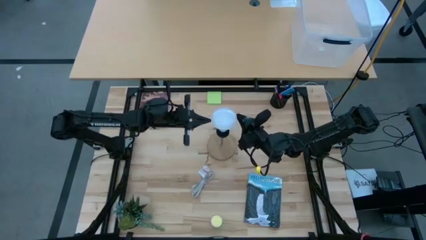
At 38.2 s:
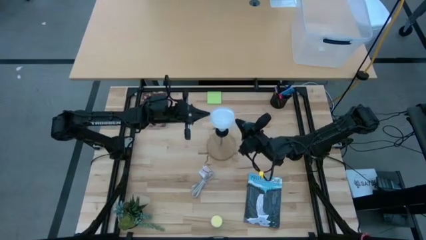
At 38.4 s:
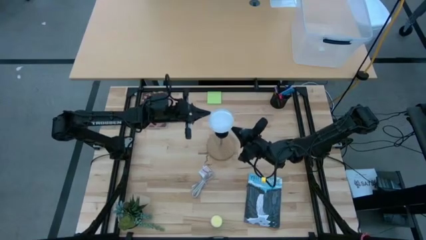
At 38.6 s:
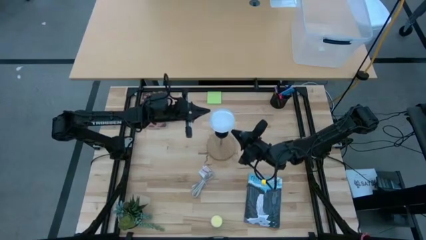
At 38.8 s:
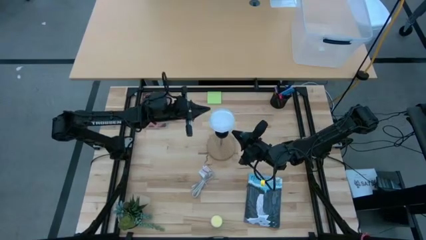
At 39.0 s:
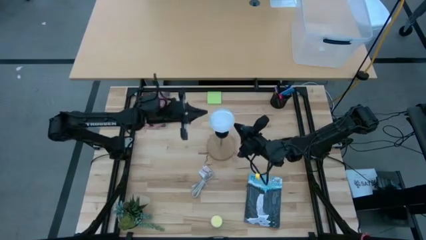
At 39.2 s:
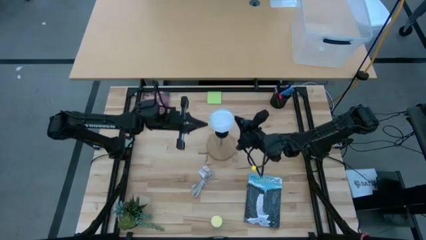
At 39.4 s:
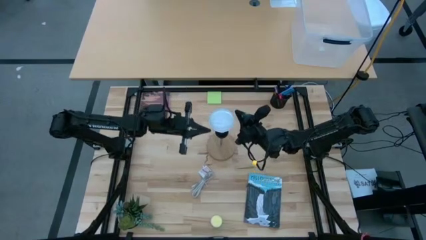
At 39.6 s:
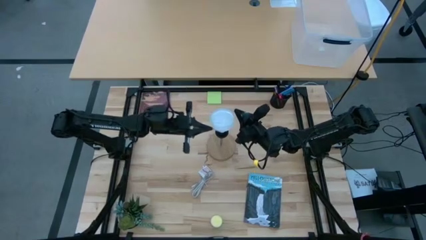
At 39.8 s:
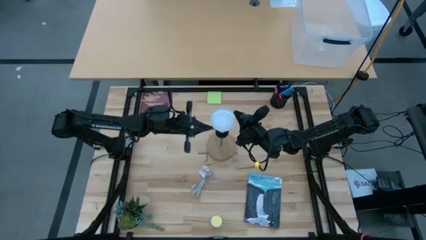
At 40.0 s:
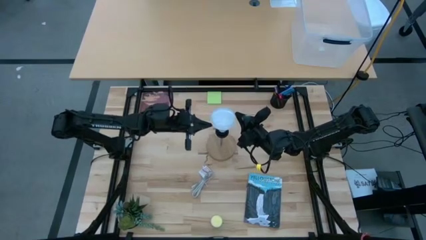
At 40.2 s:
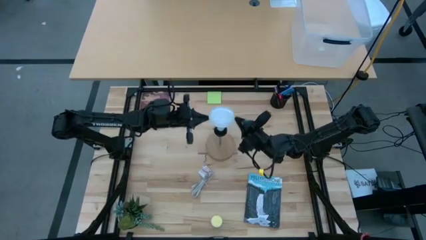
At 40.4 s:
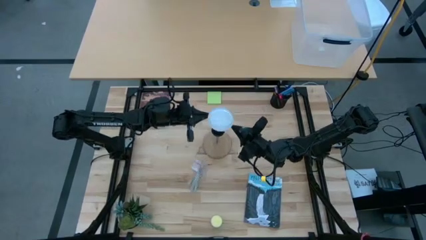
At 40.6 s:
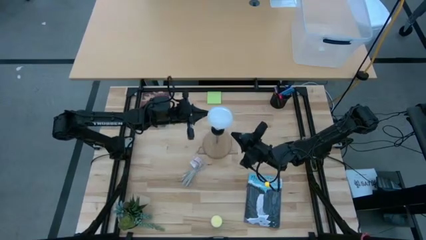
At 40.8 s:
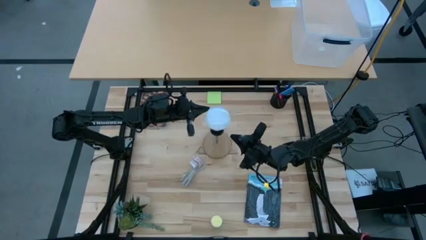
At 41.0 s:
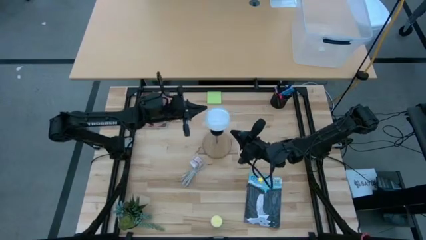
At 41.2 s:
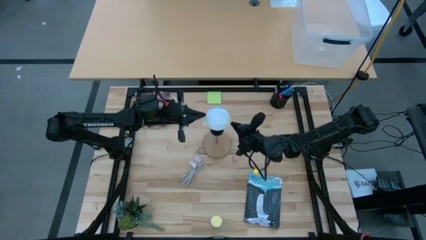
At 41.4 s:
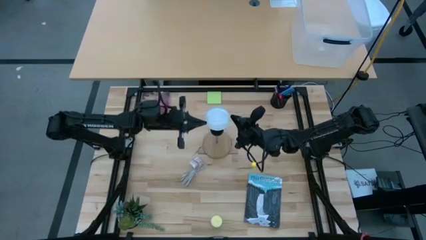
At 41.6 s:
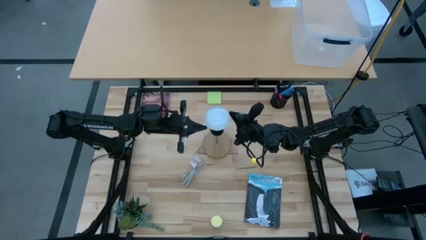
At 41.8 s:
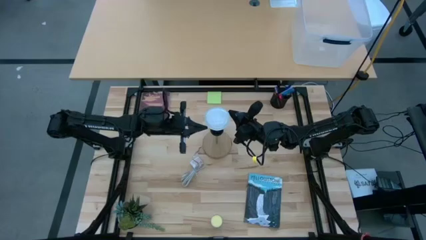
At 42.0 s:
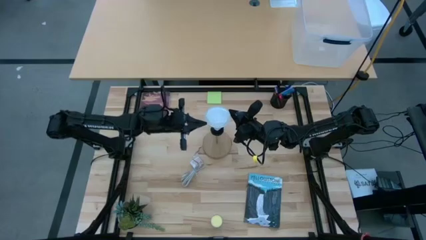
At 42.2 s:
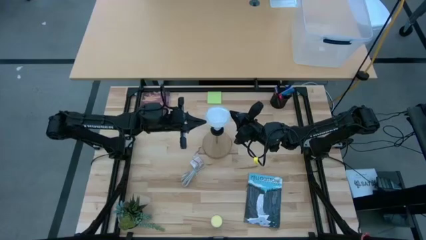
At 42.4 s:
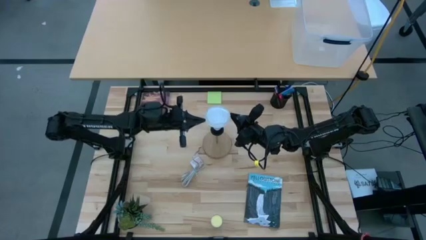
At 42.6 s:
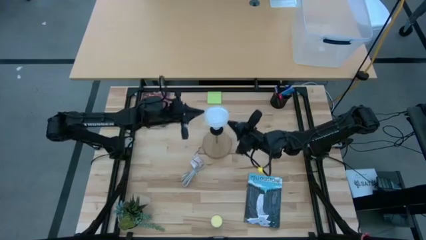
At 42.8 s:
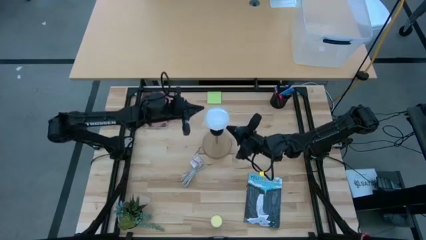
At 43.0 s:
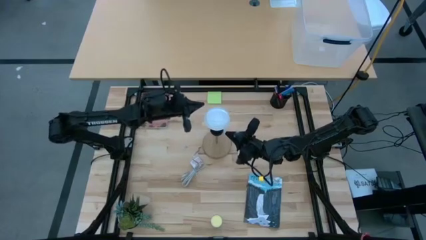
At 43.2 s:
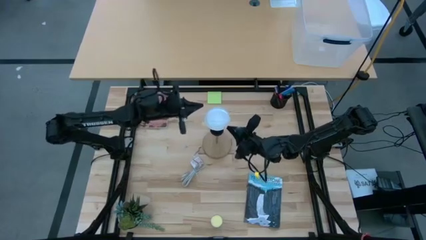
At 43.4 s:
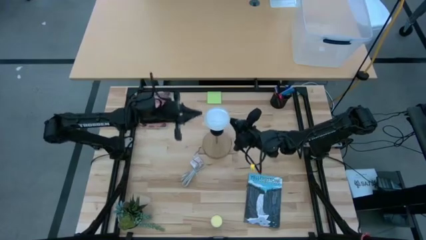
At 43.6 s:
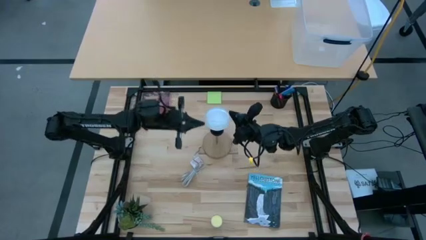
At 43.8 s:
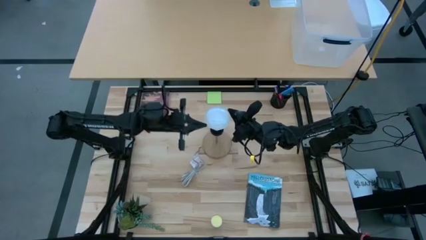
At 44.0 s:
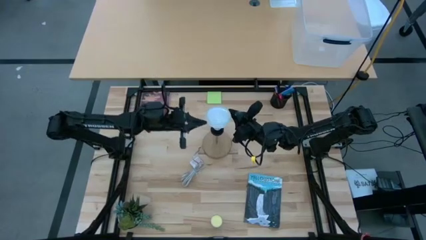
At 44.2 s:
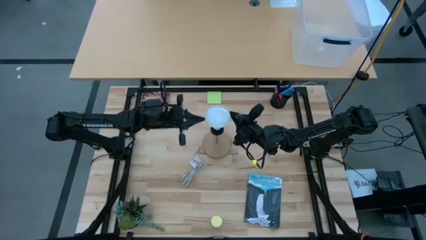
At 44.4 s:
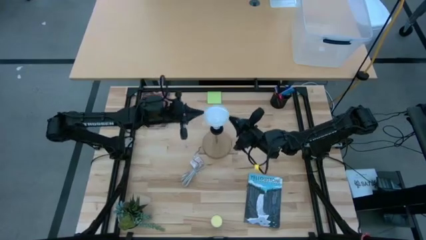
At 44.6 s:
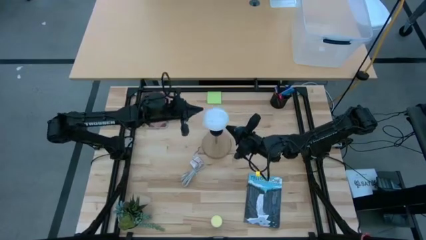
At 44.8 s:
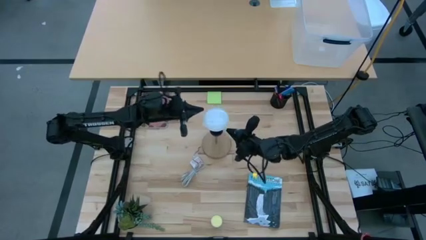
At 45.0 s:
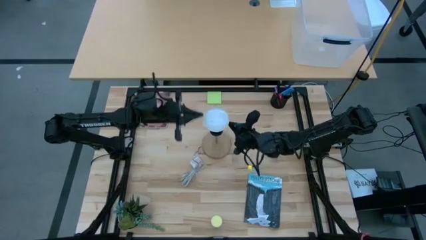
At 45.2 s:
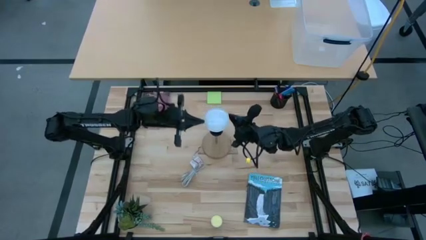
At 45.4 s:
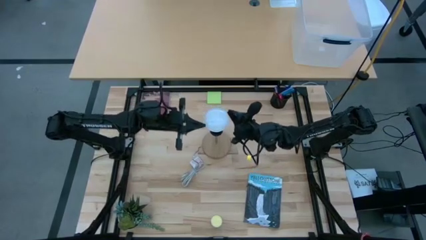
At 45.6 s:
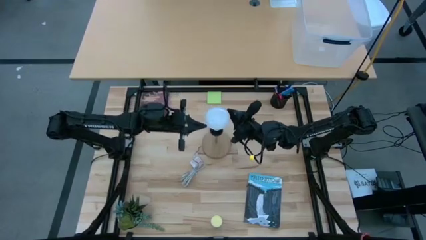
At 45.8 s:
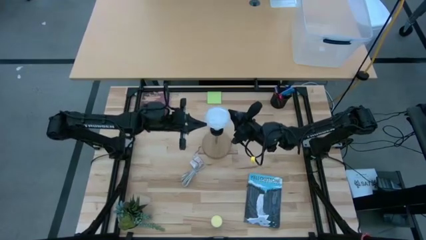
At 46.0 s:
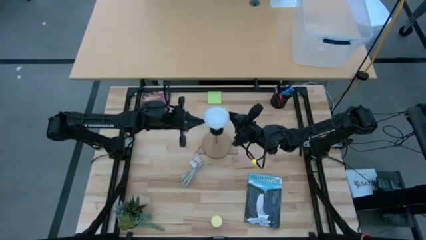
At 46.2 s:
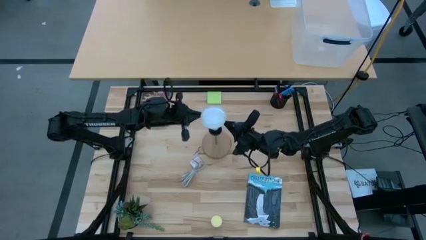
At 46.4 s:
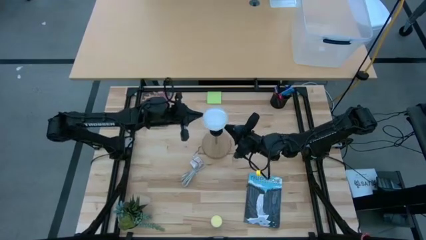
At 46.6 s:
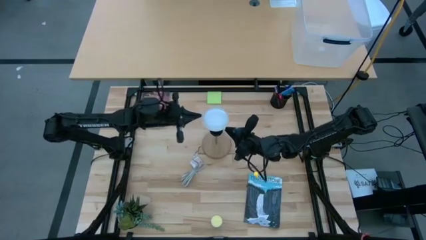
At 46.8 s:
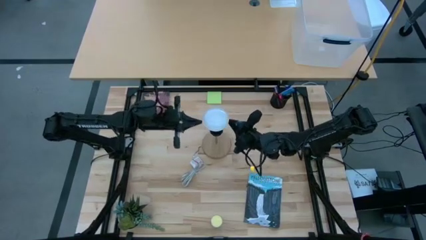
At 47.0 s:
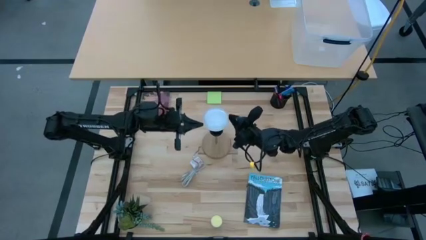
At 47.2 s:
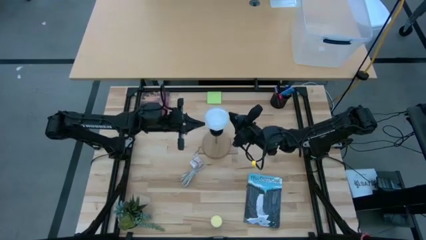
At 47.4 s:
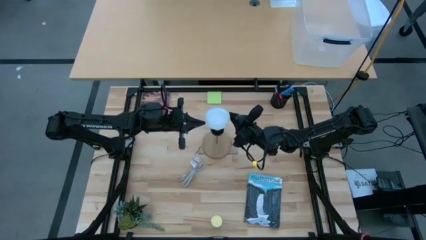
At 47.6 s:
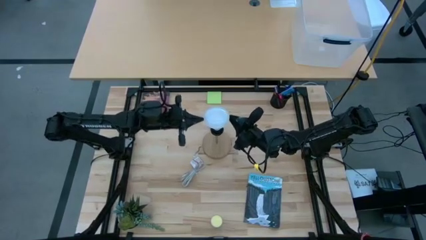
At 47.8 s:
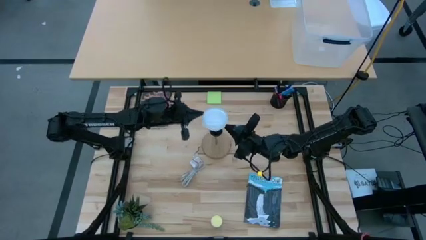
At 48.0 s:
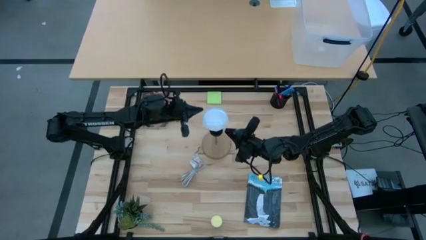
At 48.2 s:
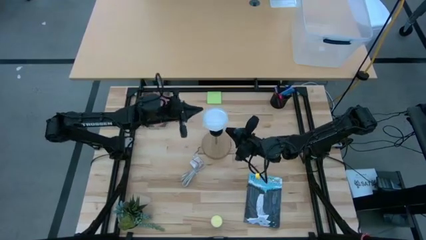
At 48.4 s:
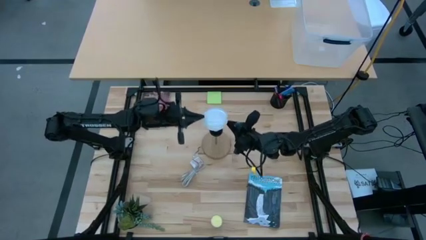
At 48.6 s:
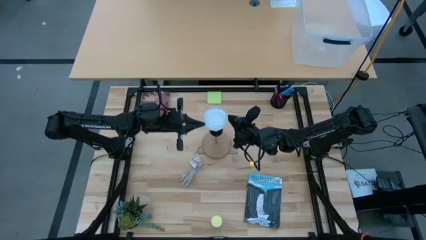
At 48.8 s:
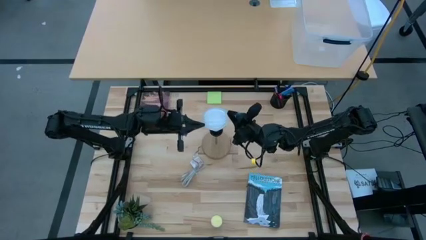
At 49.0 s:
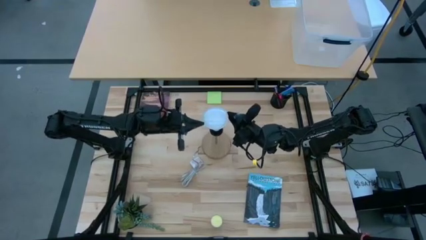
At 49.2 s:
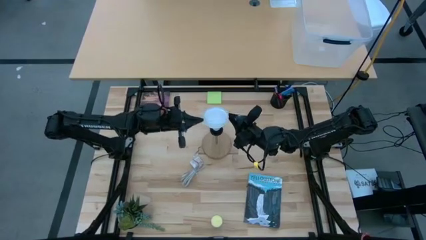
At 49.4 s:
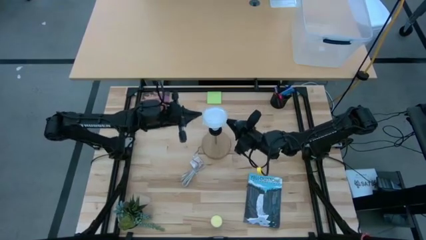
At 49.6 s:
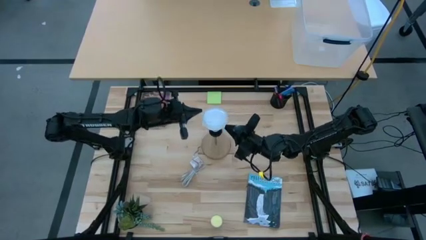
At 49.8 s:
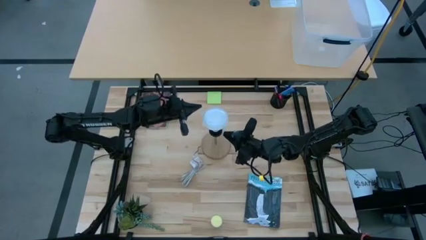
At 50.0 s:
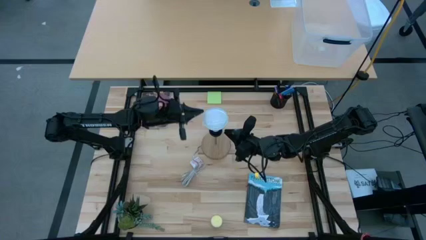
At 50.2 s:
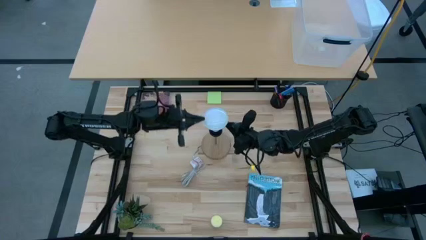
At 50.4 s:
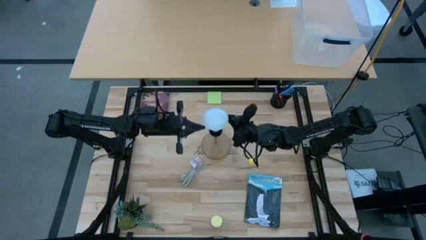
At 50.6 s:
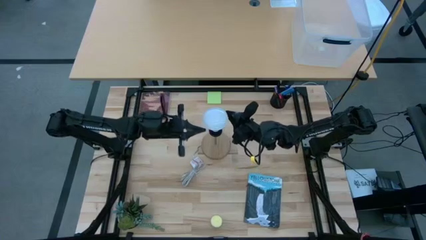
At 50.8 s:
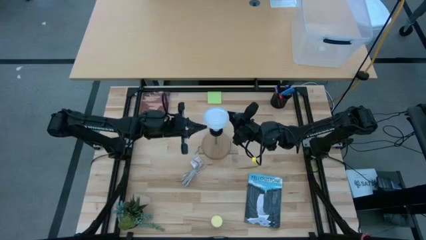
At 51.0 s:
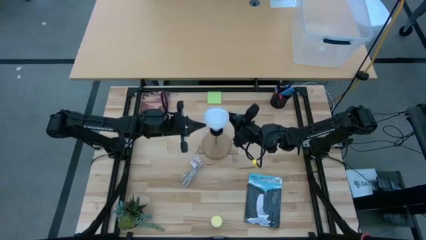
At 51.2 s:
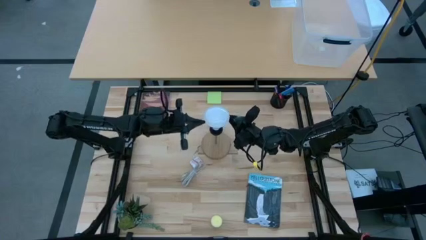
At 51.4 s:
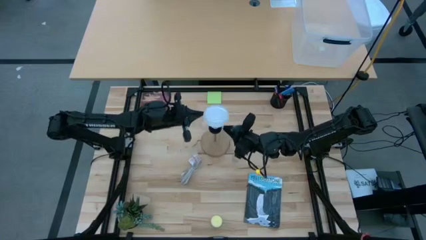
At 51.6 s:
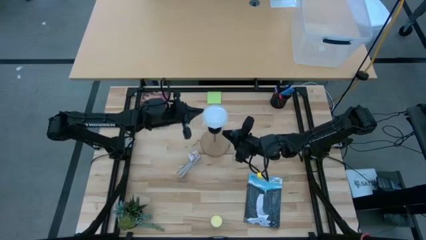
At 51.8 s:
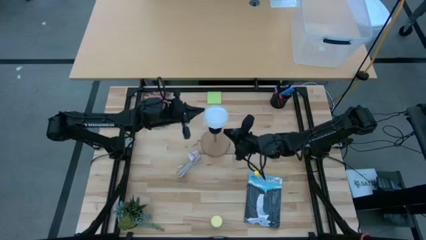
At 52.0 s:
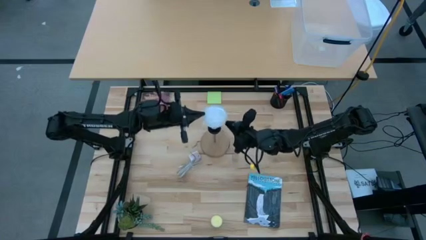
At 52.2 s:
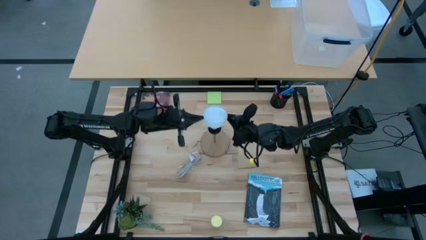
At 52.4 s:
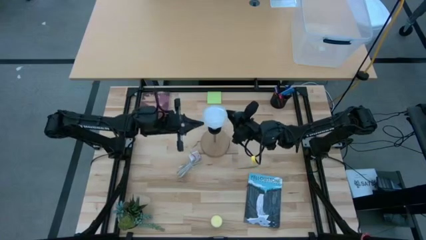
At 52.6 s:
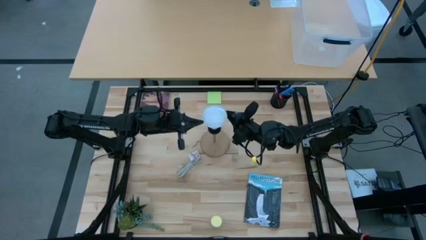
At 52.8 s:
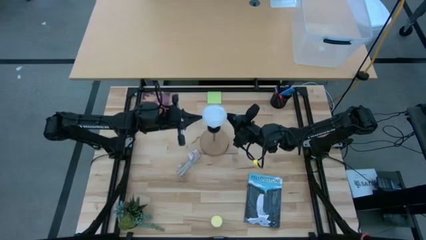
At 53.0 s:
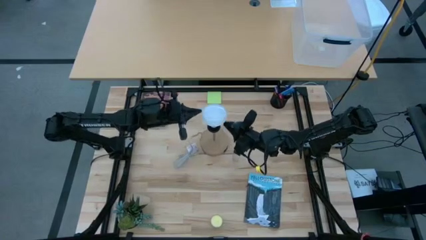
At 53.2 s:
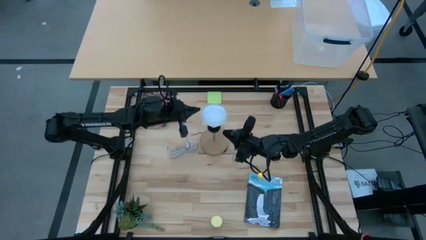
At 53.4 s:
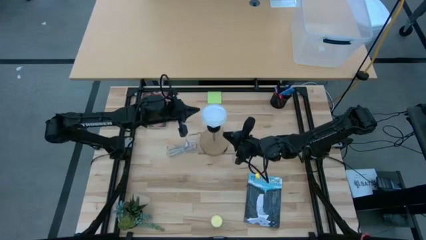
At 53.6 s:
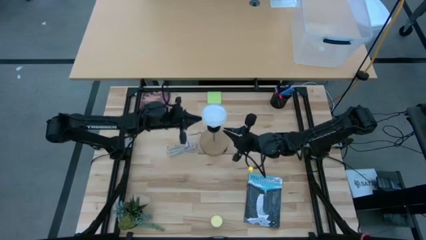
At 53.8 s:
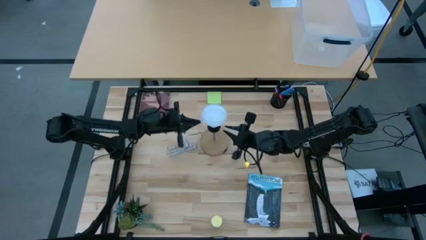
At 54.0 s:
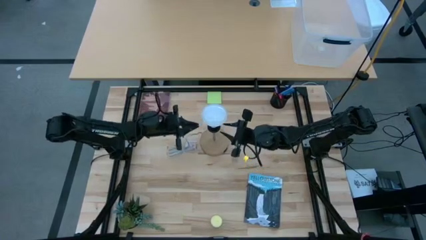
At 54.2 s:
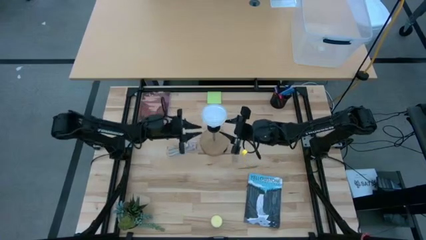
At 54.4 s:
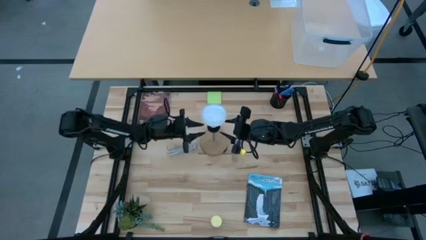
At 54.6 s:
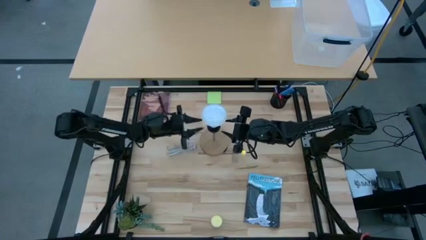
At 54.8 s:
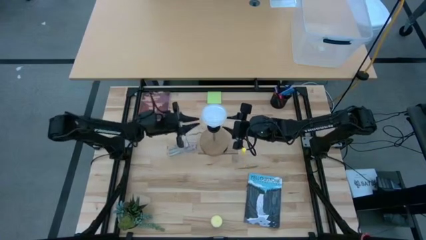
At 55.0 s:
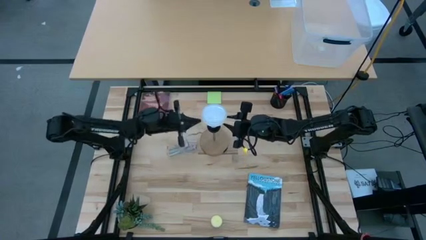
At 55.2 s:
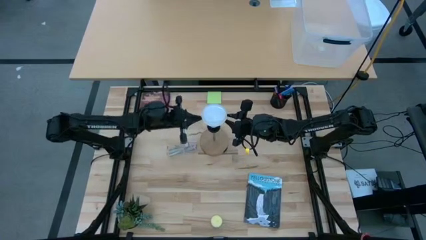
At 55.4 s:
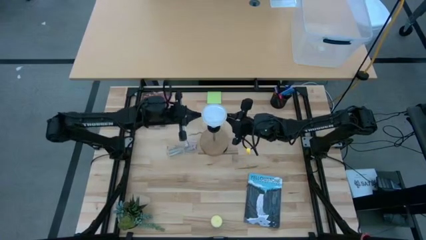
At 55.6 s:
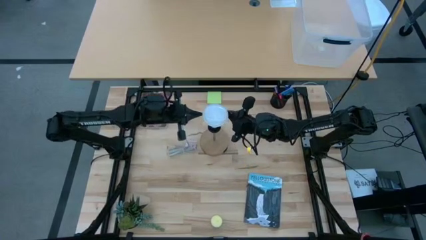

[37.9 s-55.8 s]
Task: Screw lightbulb
Insert the lightbulb into the lamp
